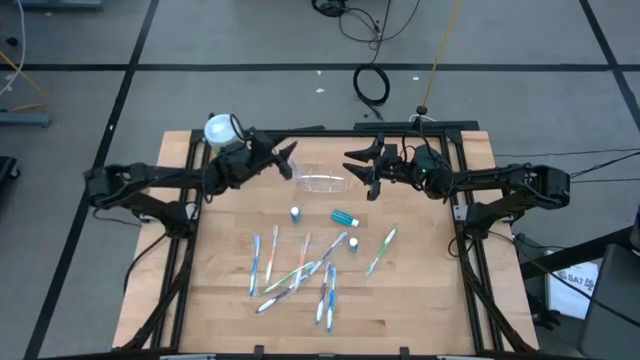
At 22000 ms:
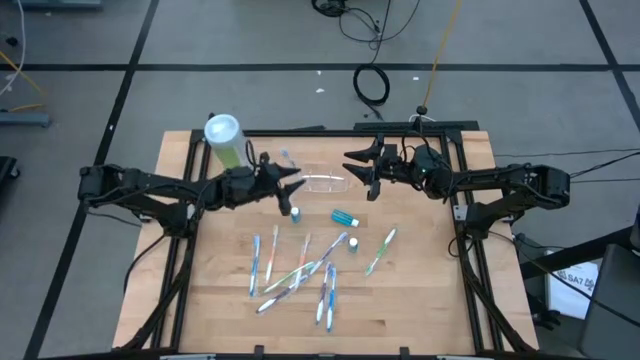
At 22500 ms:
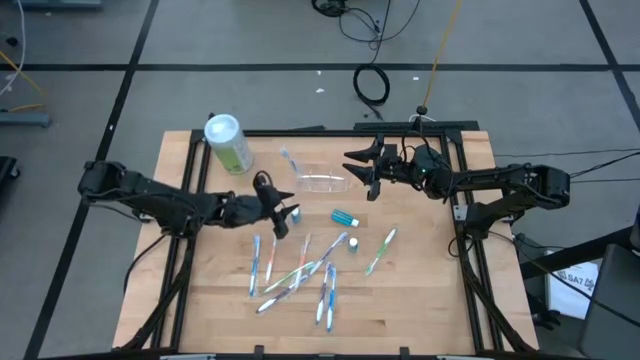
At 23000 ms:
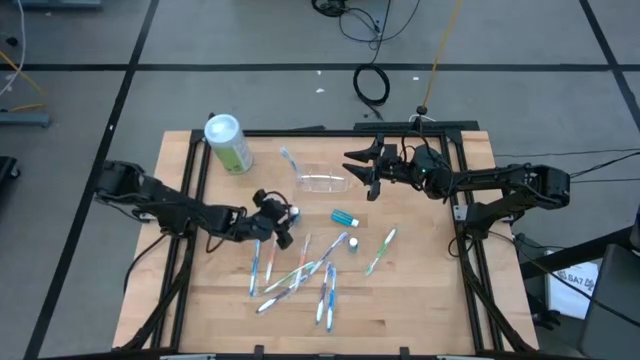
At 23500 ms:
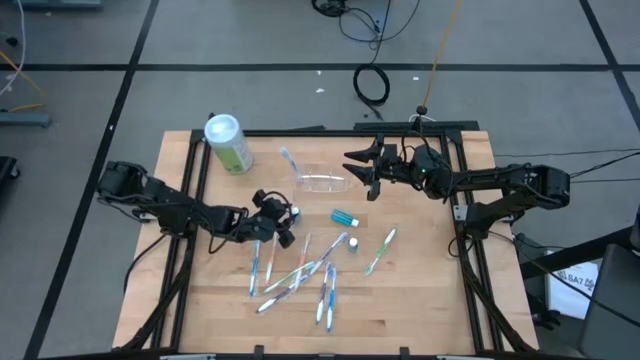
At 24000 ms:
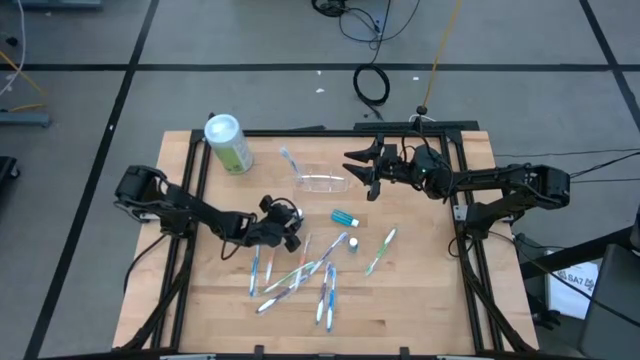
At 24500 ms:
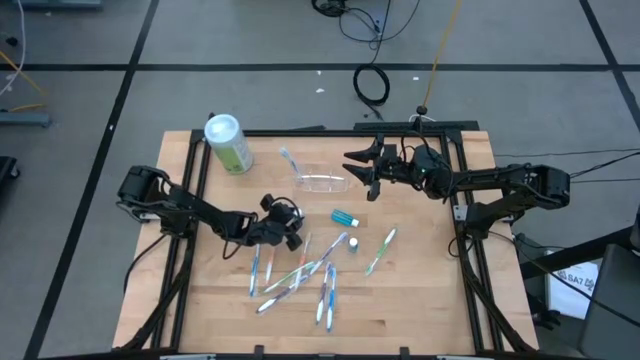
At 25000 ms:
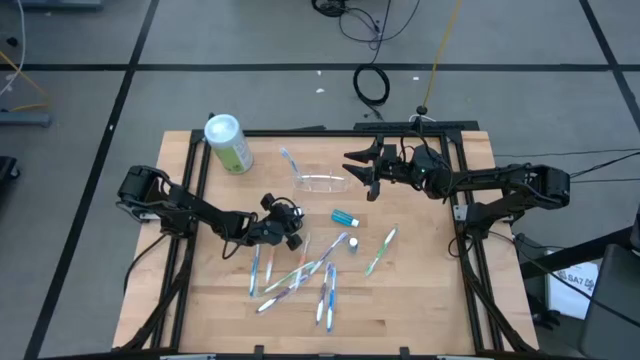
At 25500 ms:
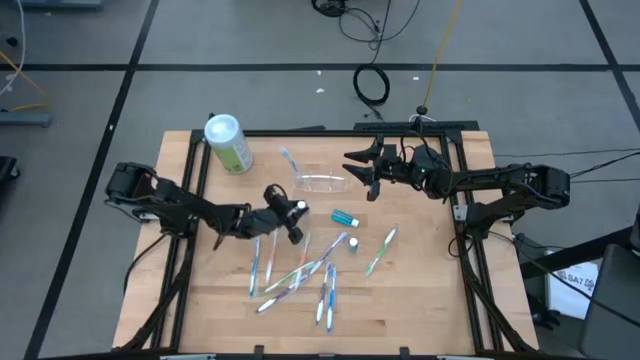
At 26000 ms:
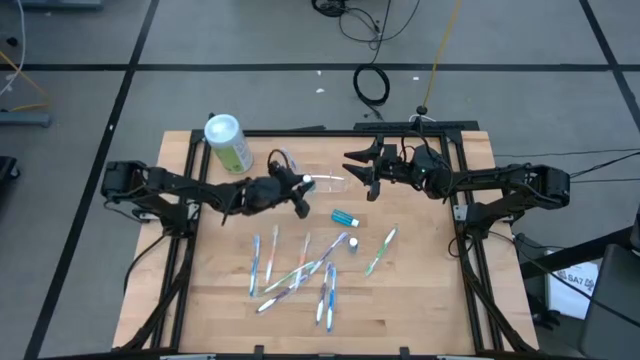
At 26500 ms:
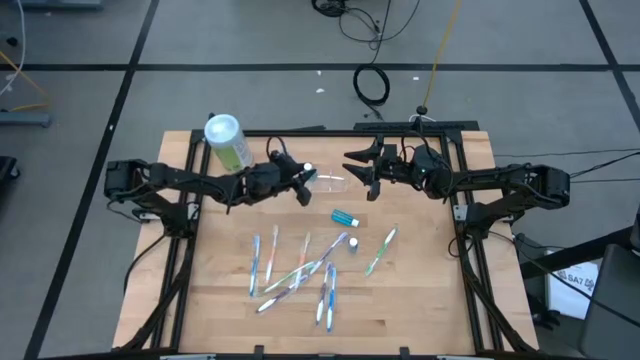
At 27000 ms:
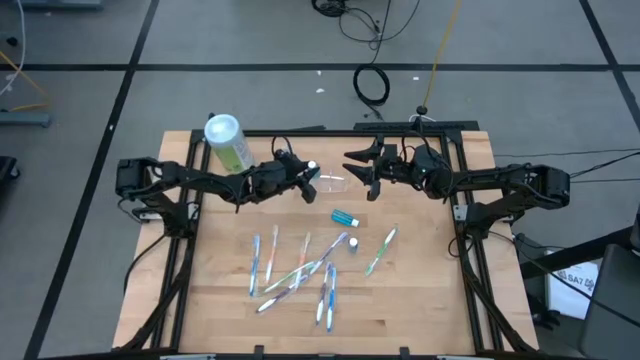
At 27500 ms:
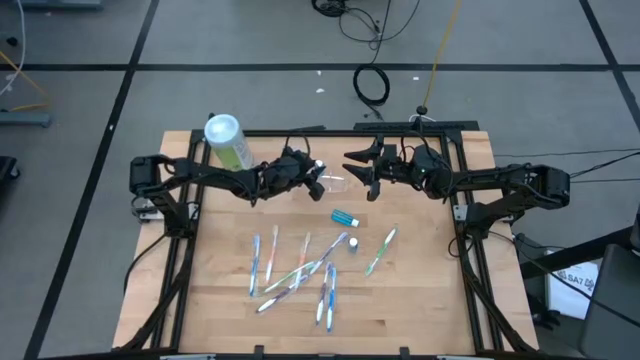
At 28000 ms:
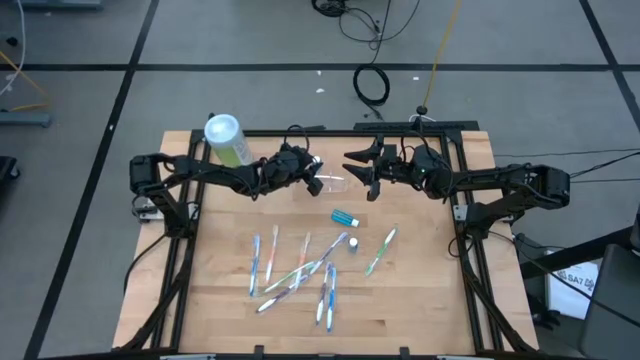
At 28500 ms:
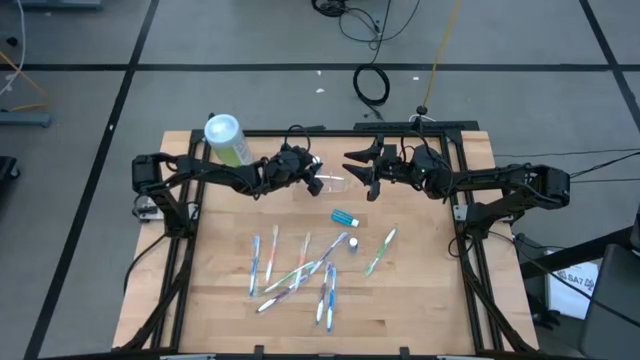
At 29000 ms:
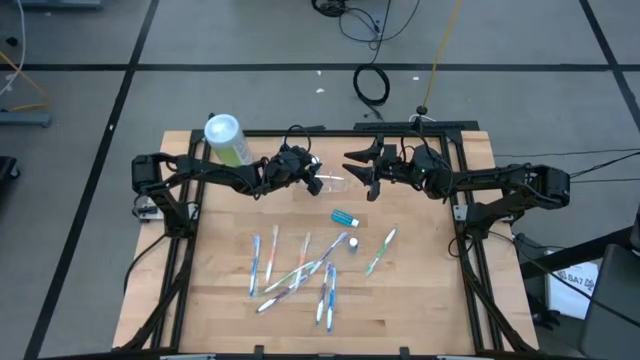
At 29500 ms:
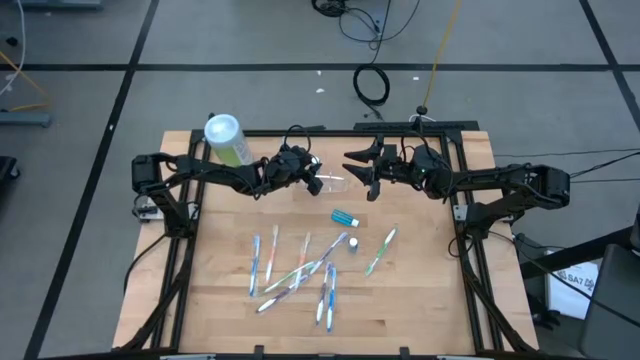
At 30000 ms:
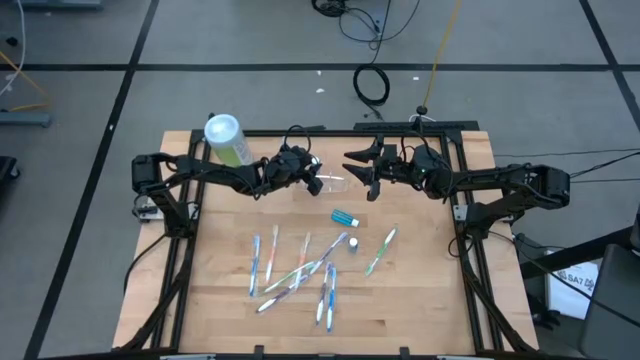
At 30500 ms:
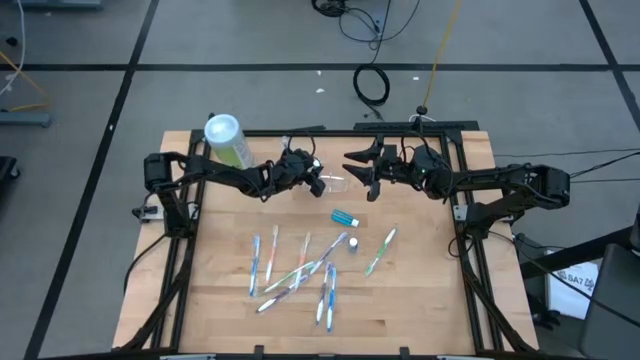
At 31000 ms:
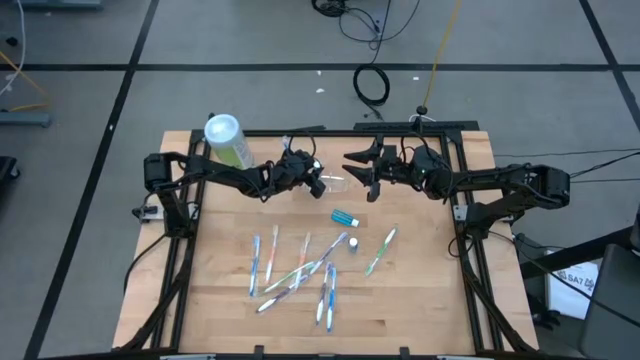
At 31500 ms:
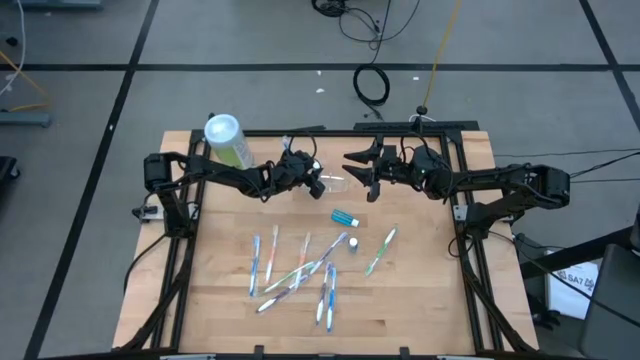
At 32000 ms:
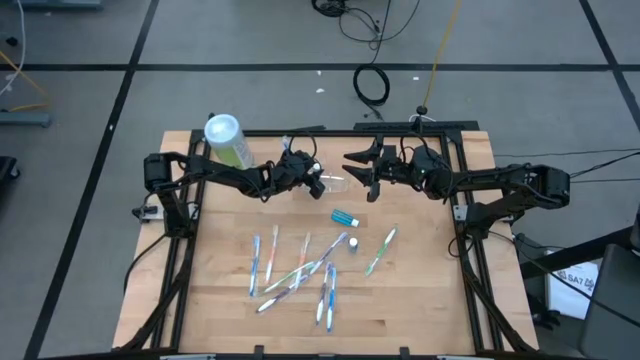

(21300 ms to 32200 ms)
Task: Pick & Place toothbrushing station
Put the left blue mouthwash into the transparent organizer

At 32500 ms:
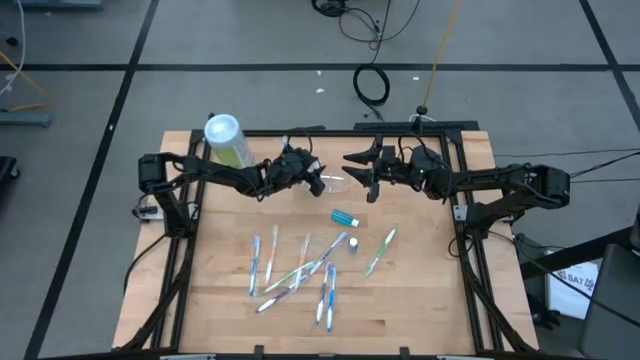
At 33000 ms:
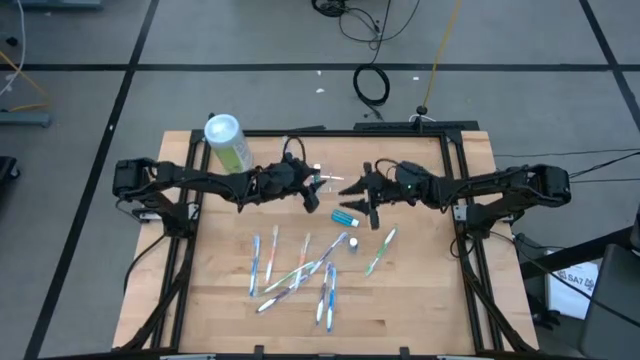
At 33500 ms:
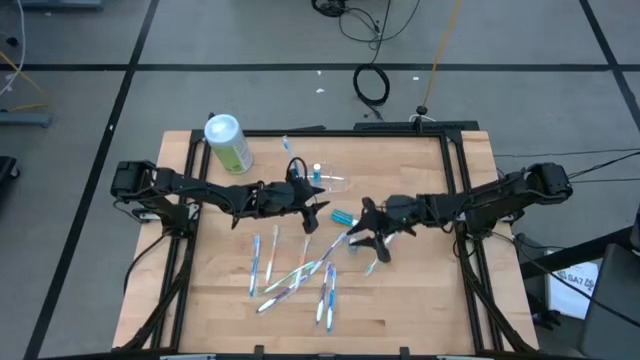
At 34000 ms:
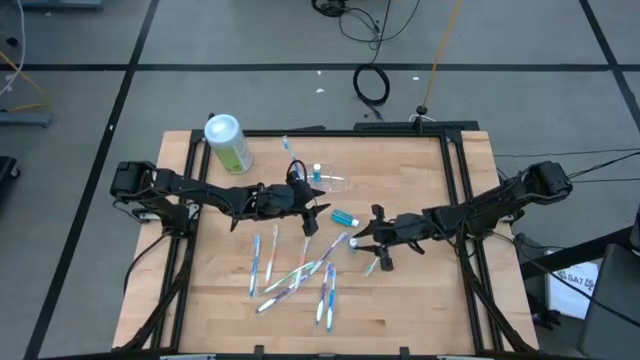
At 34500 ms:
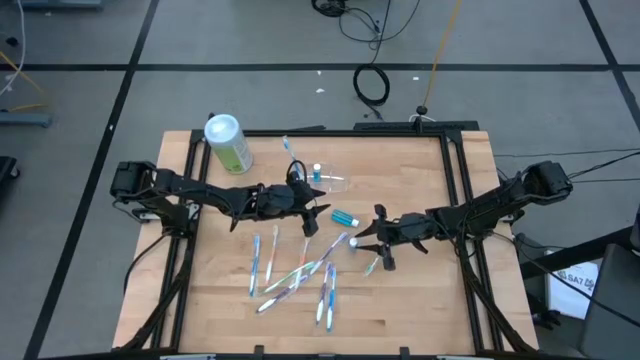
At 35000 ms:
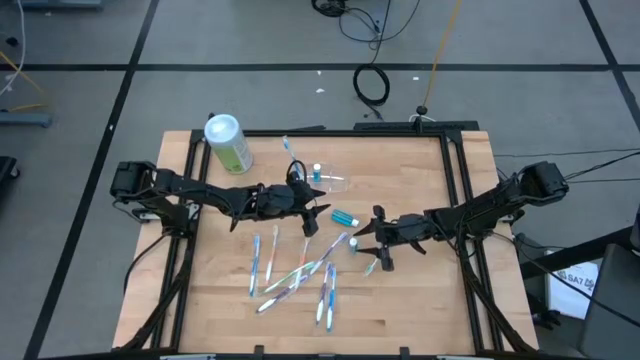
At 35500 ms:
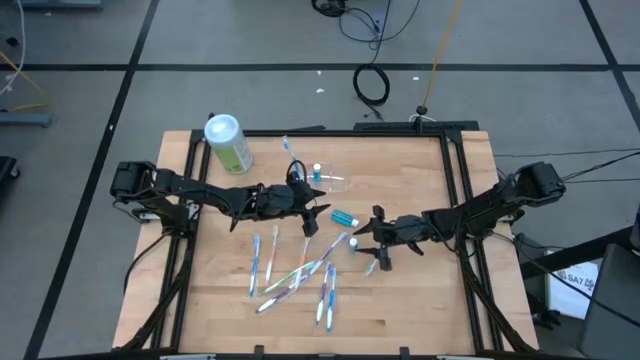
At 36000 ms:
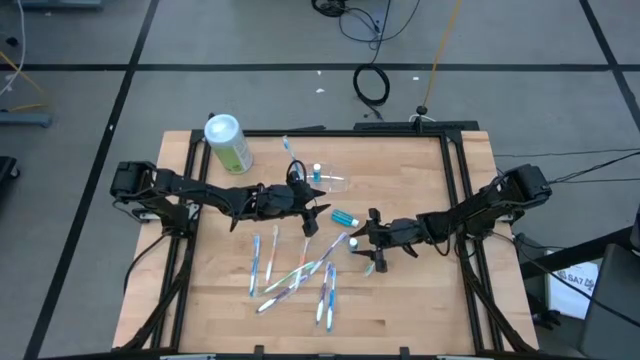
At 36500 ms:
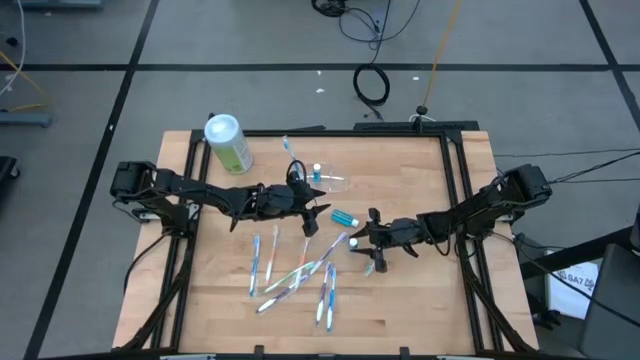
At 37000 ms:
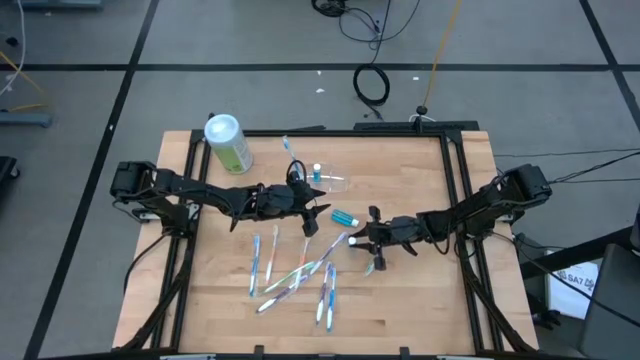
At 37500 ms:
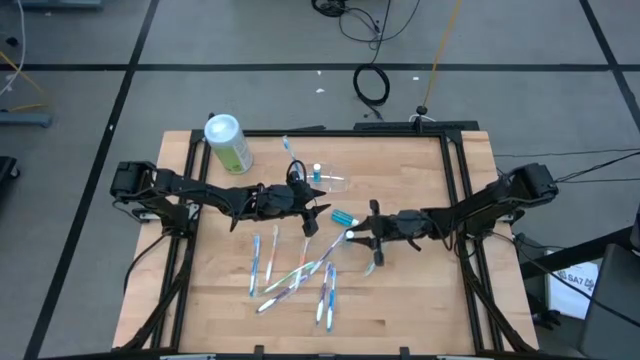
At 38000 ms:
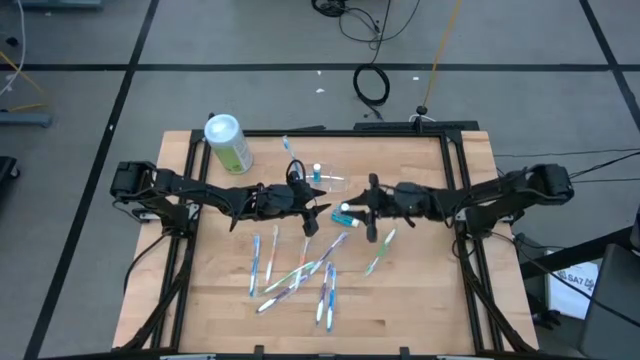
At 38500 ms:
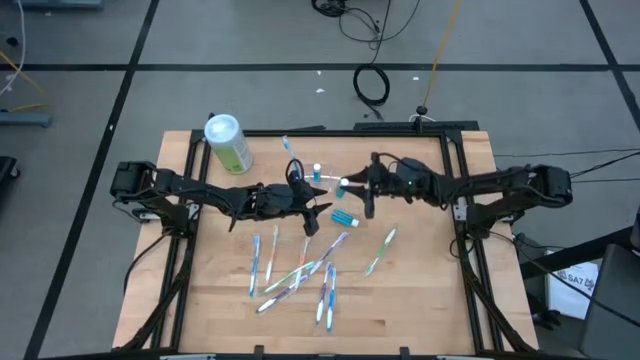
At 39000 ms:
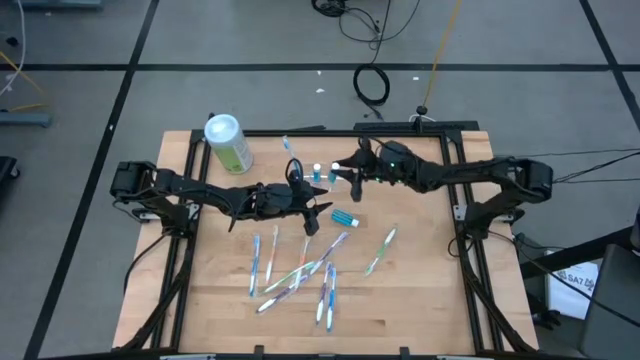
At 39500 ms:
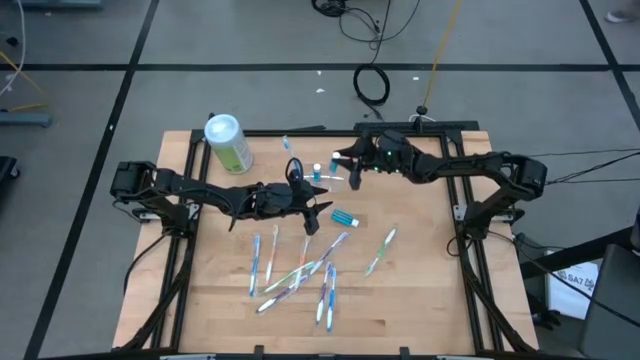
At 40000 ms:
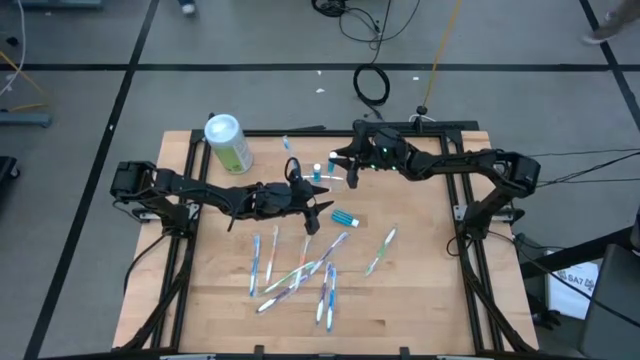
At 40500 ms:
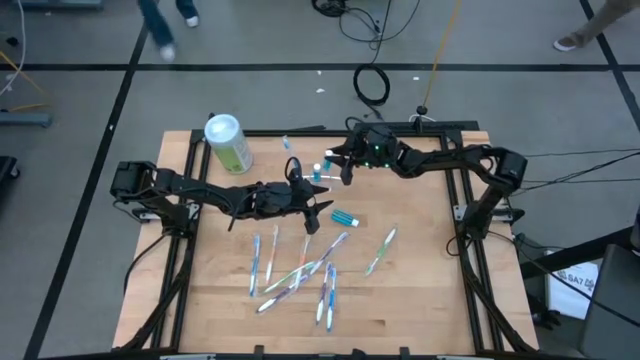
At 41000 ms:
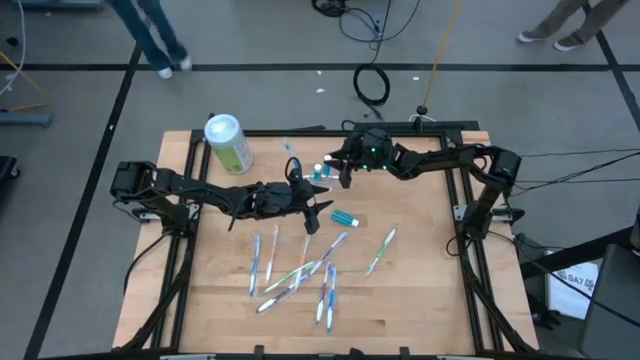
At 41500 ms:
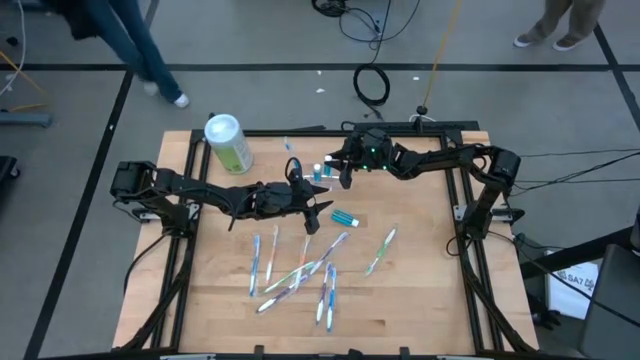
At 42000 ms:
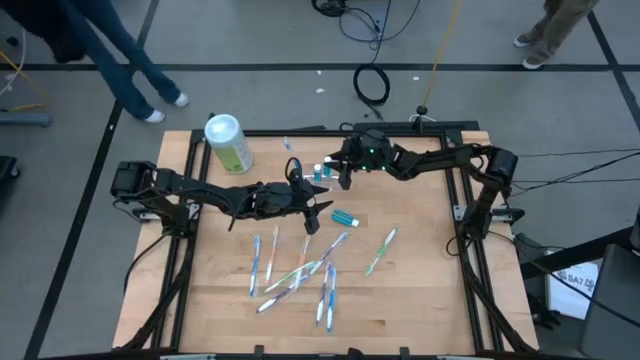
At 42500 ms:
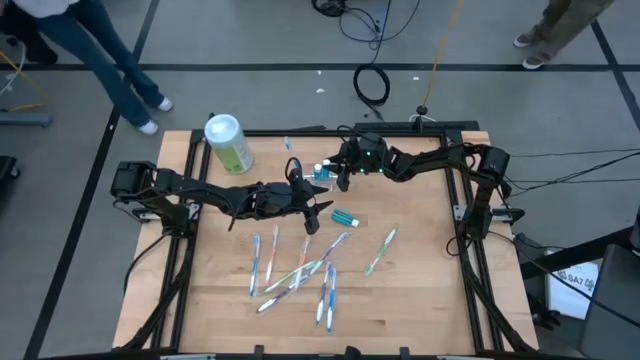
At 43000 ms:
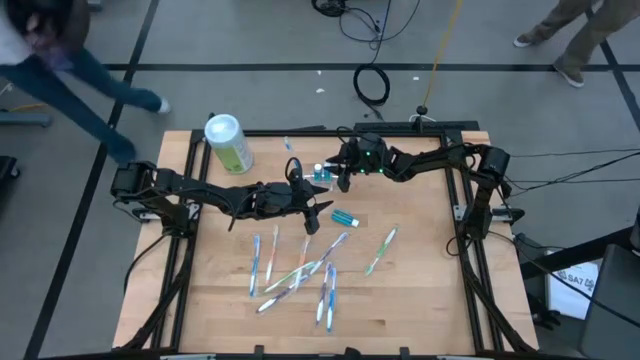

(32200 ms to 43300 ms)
Put the bottom blue mouthwash into the transparent organizer
